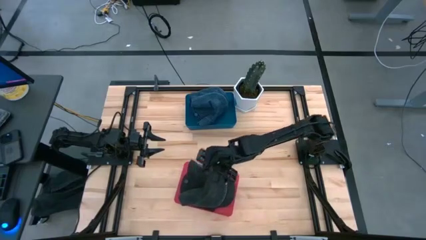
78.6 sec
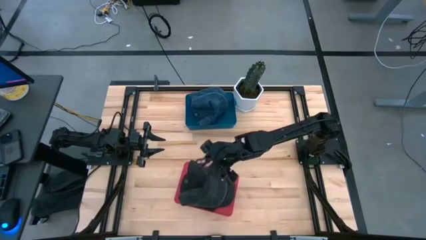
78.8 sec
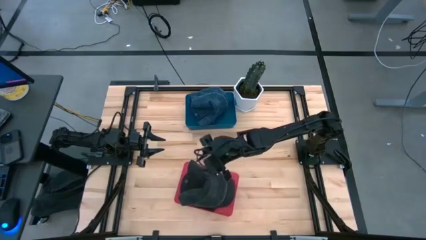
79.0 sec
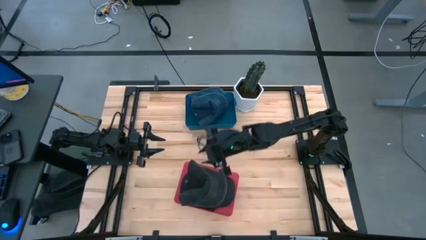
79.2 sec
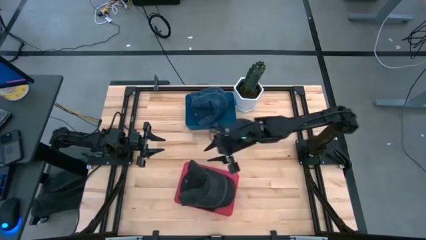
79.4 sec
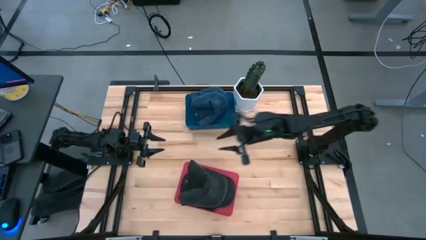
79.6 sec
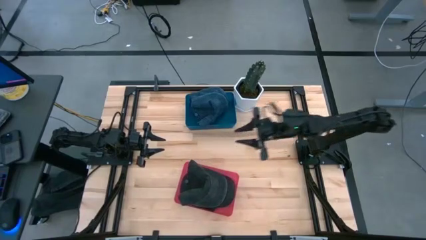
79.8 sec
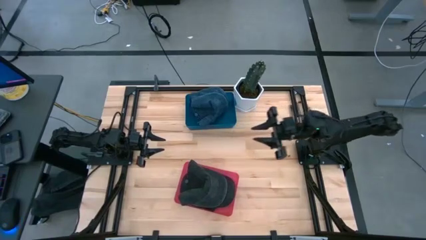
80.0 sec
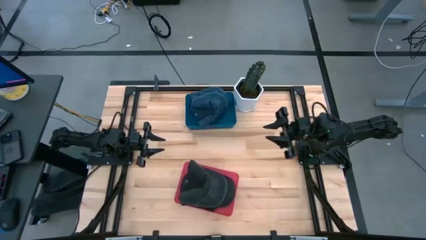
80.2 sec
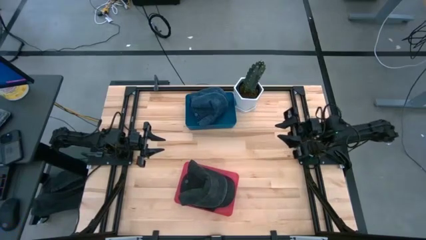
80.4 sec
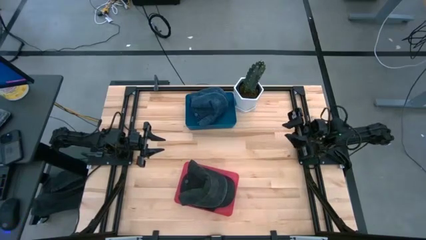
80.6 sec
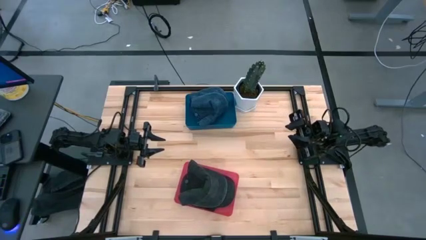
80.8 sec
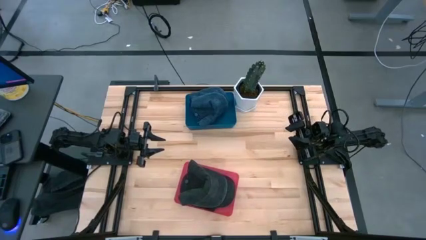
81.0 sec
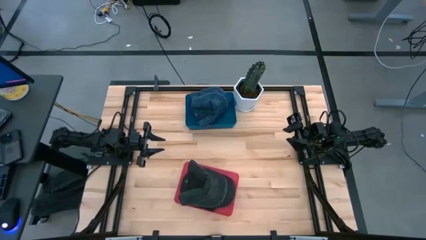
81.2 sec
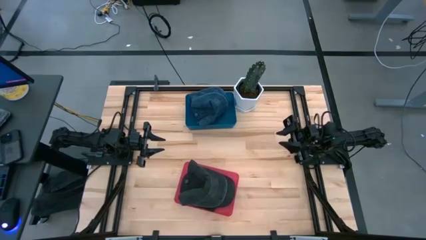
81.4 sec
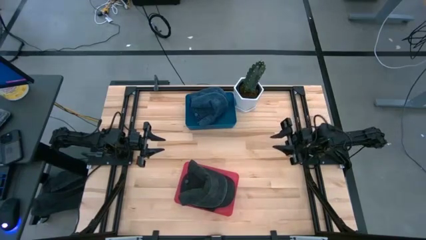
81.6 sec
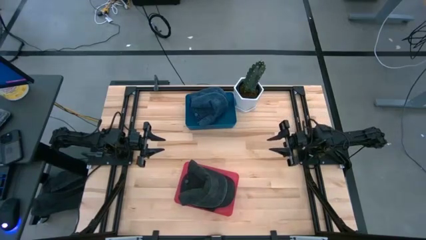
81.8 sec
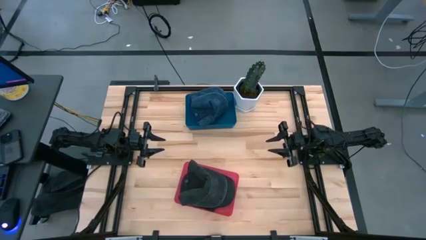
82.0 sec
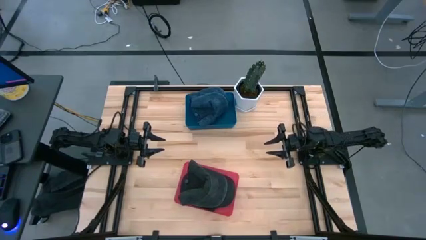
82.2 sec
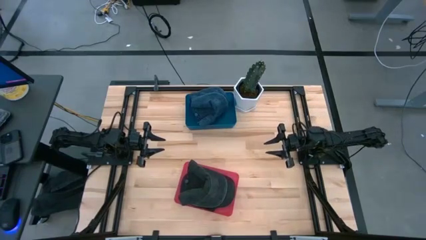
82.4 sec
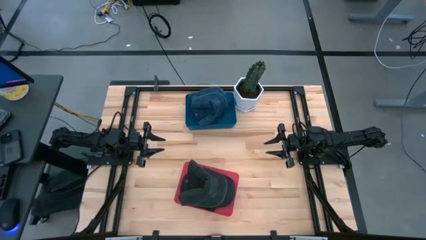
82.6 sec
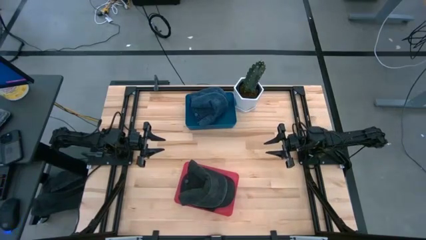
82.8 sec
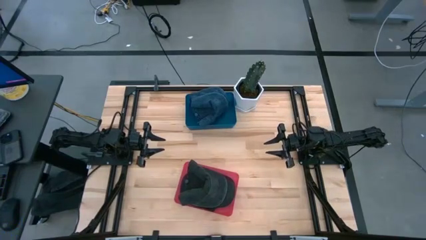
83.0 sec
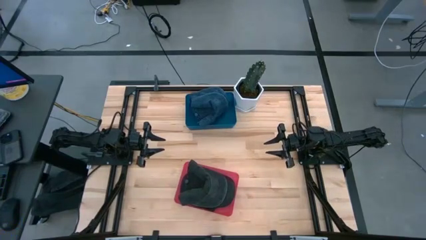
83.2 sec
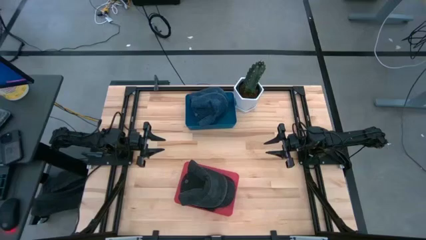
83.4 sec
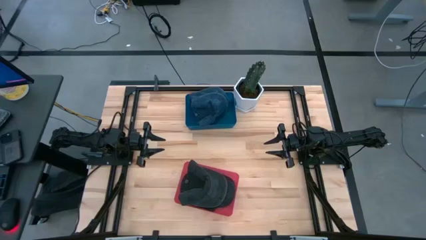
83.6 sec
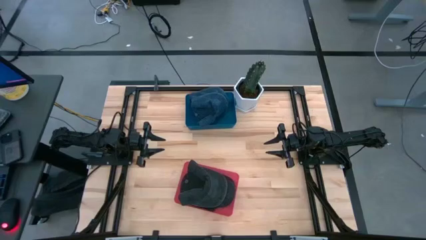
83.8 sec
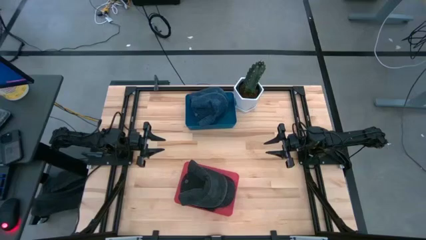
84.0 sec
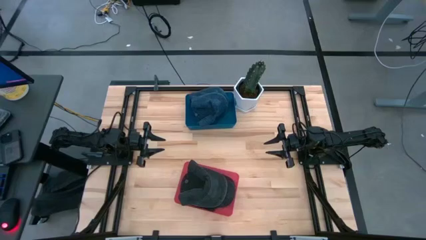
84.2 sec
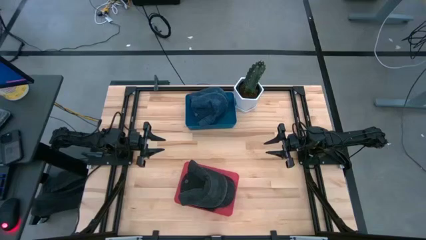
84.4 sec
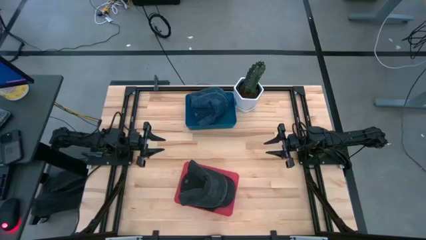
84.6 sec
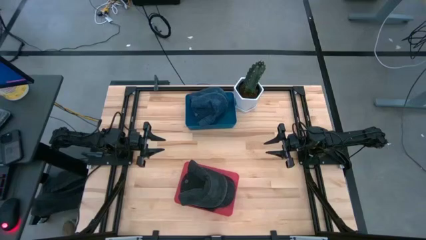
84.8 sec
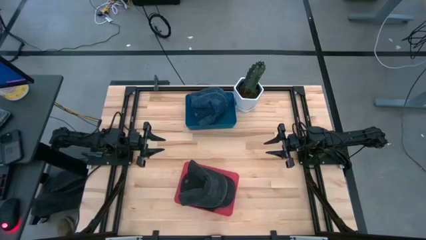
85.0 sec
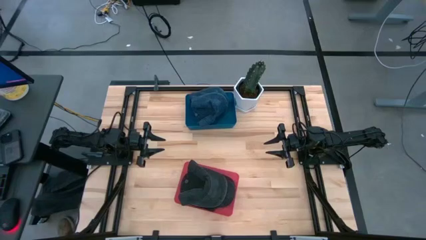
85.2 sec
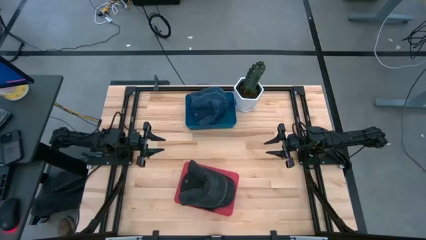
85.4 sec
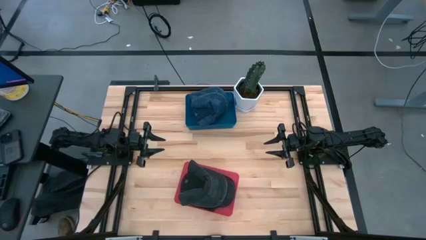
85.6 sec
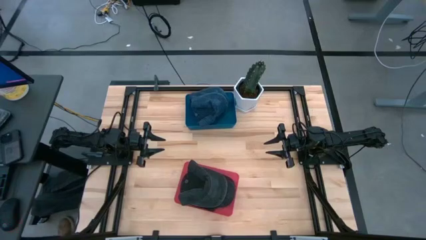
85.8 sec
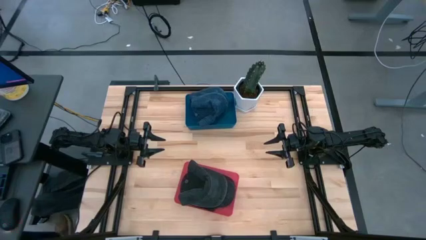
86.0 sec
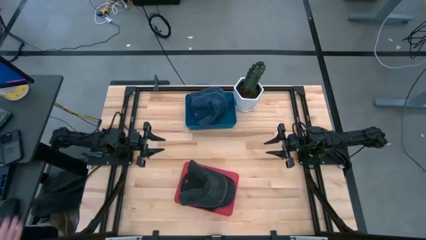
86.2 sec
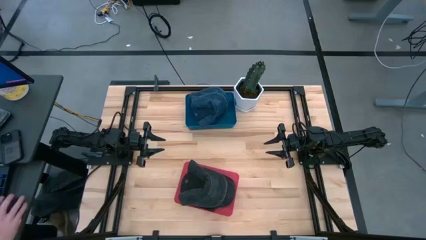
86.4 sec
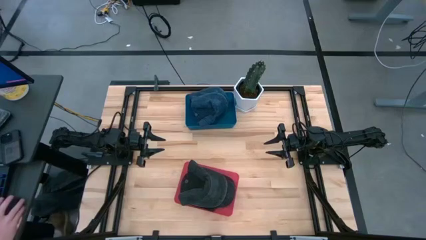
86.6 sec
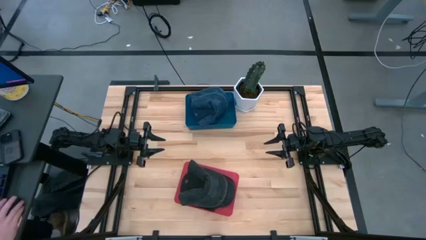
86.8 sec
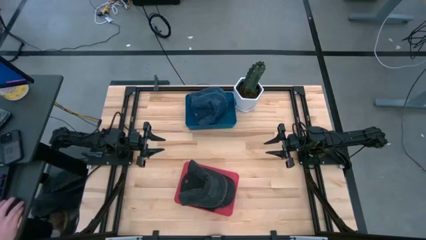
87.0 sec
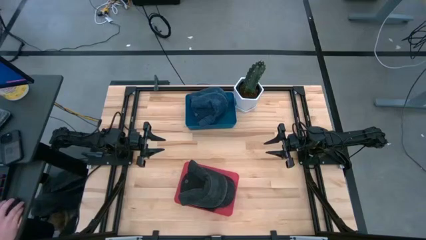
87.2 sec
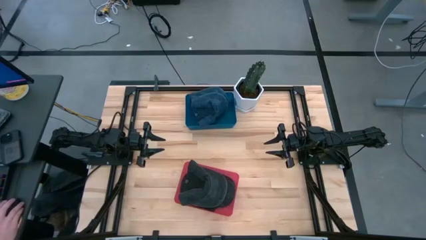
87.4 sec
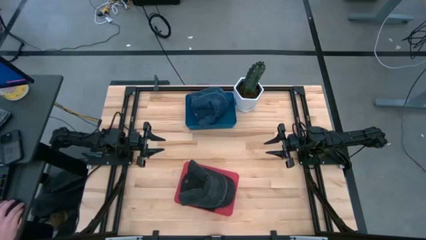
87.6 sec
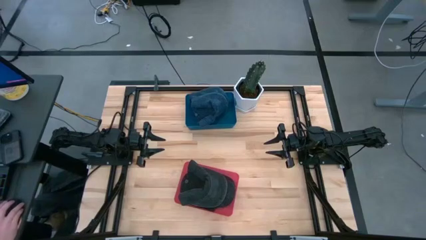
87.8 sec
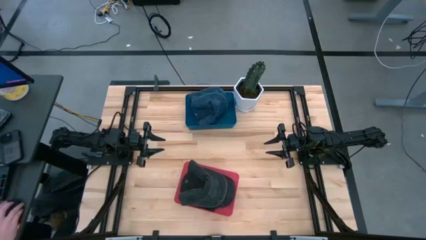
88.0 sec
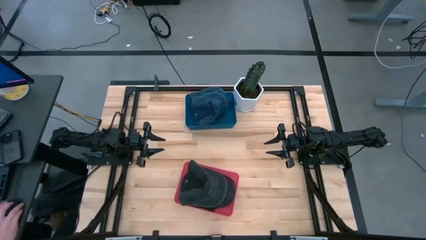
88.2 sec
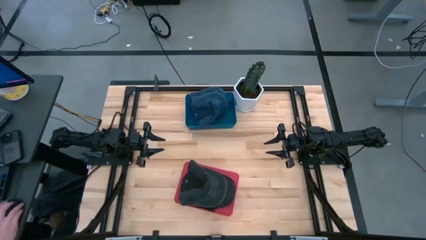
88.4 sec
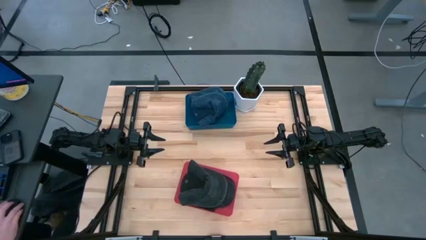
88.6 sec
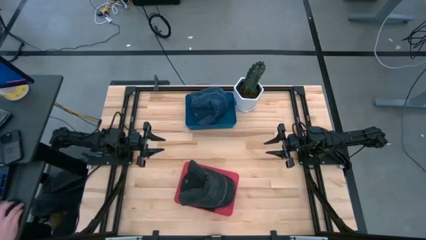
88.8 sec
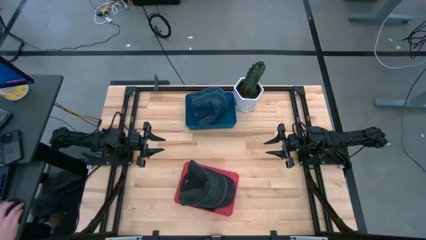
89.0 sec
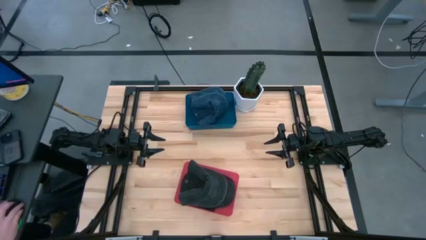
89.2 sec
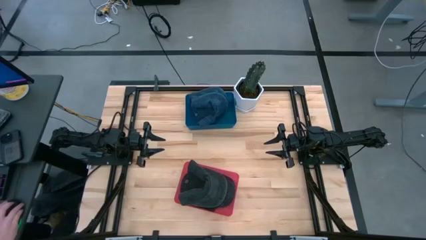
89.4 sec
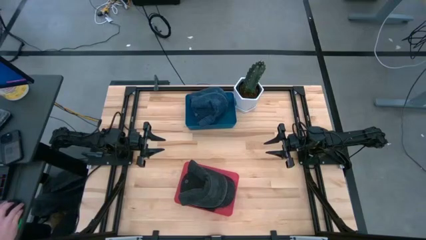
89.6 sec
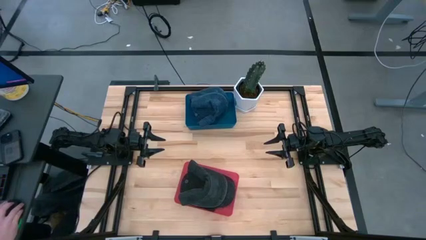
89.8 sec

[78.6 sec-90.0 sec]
Task: Pick & Place hat
Return to home position
